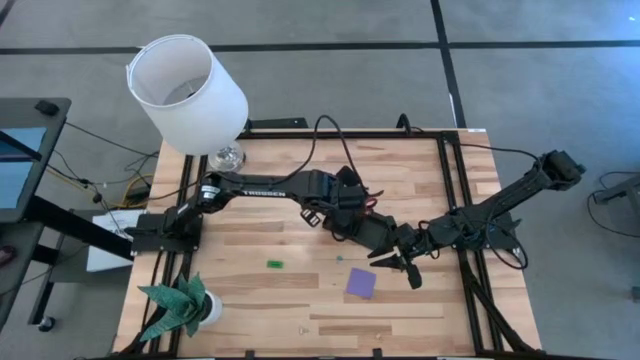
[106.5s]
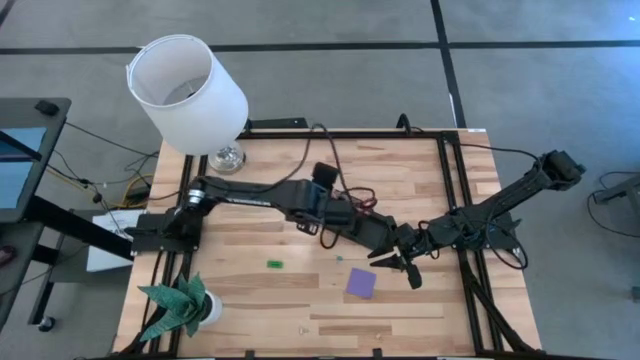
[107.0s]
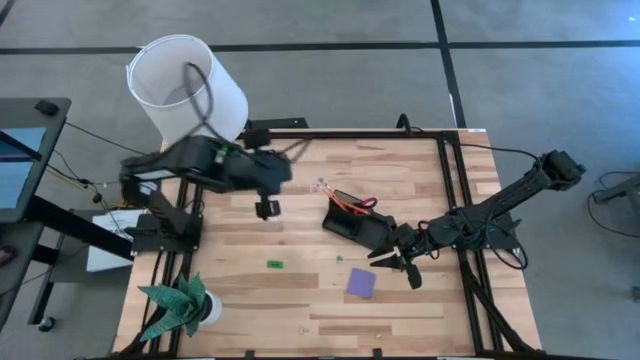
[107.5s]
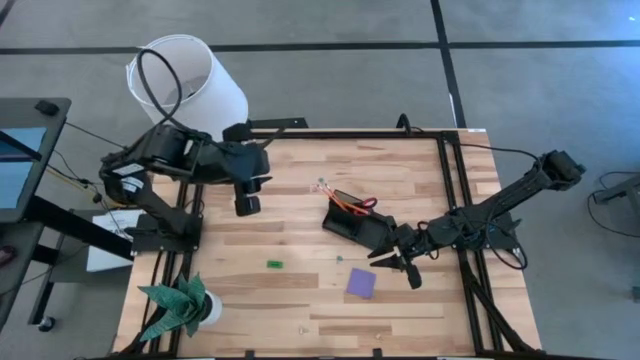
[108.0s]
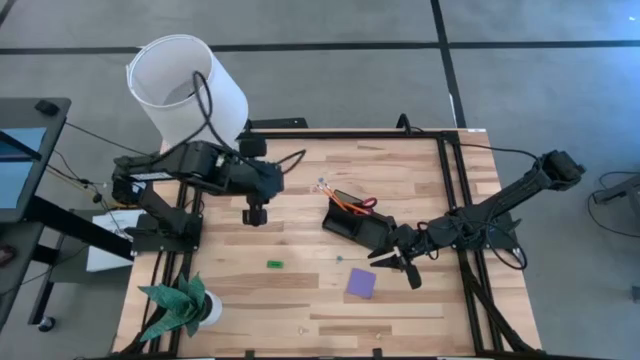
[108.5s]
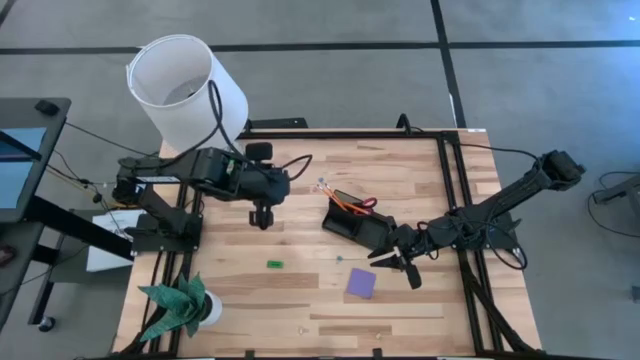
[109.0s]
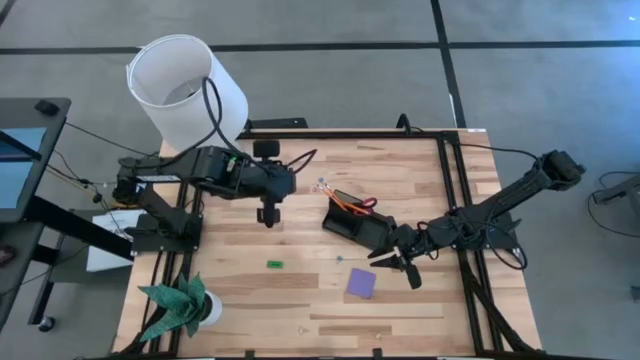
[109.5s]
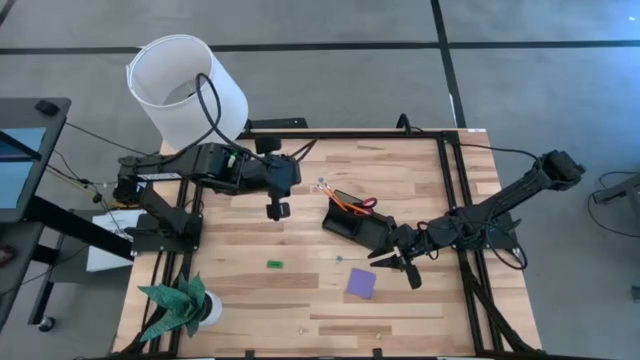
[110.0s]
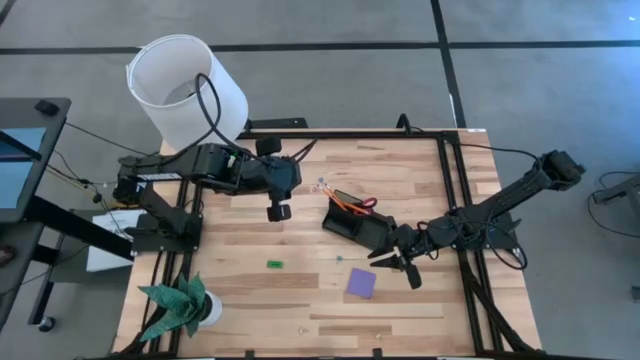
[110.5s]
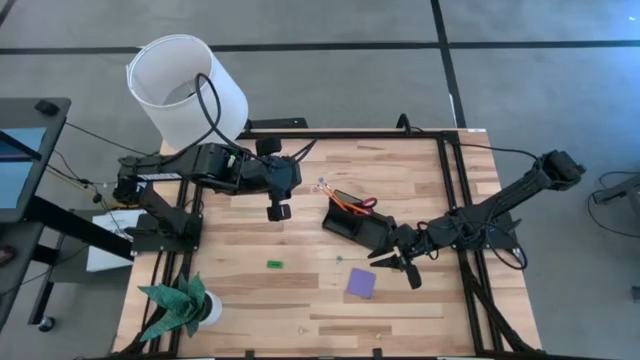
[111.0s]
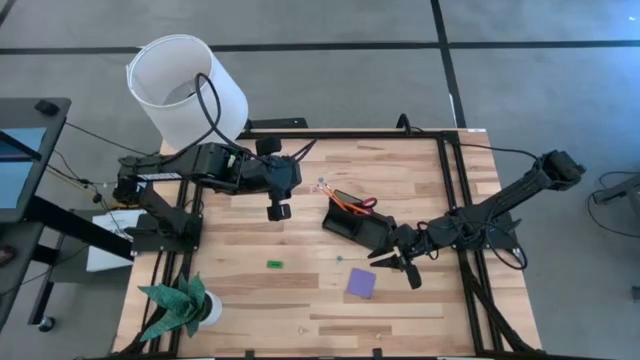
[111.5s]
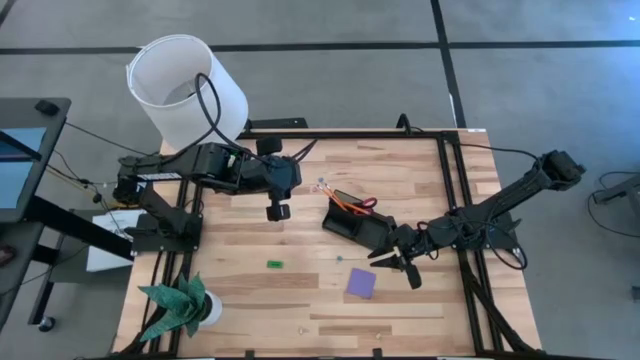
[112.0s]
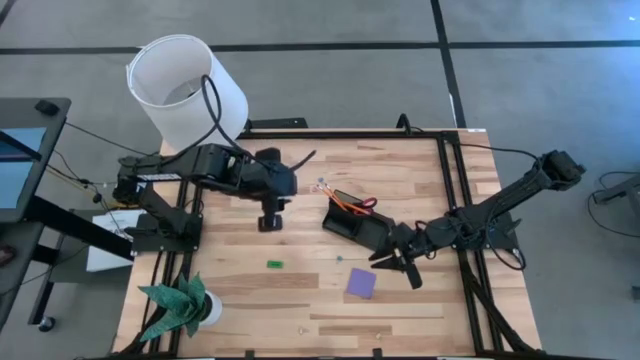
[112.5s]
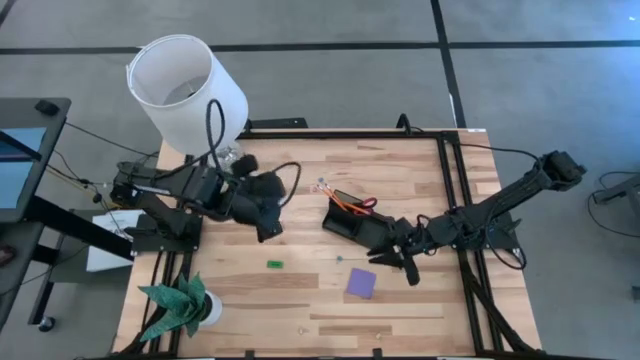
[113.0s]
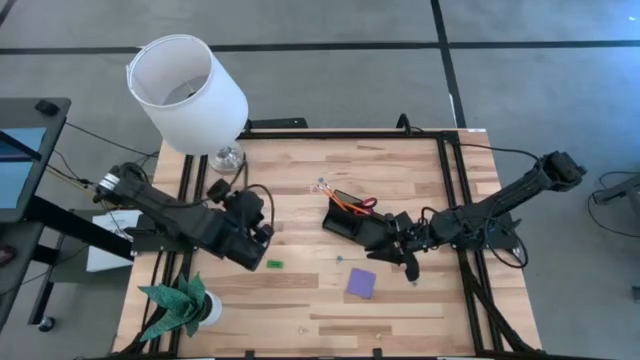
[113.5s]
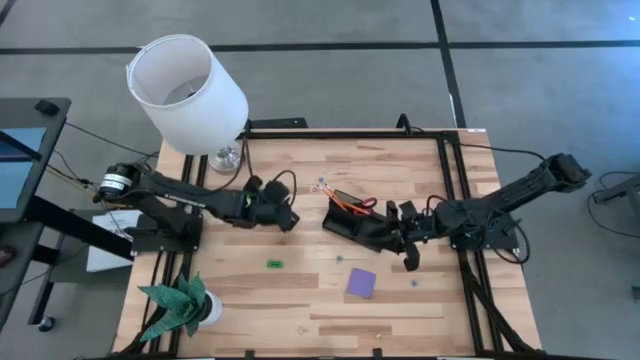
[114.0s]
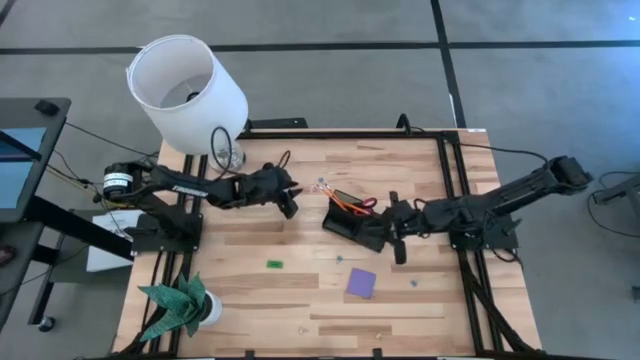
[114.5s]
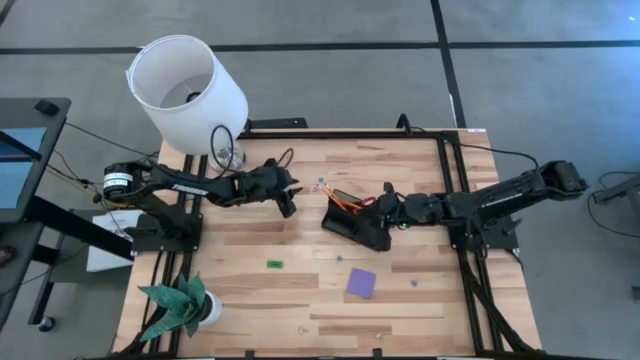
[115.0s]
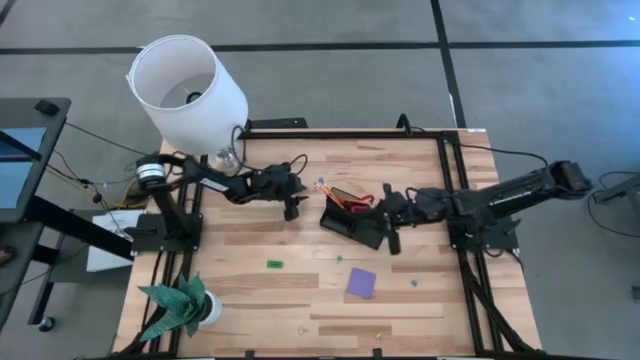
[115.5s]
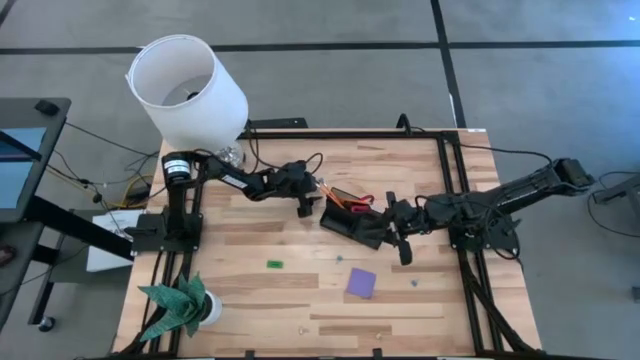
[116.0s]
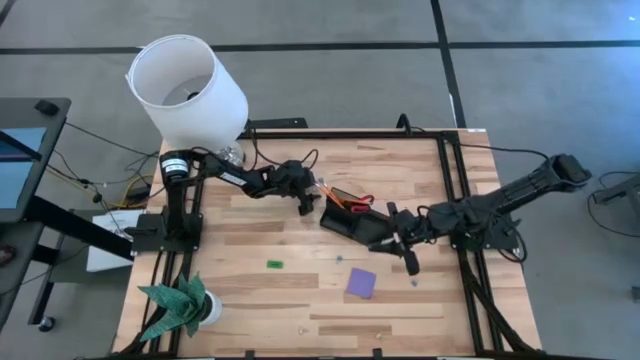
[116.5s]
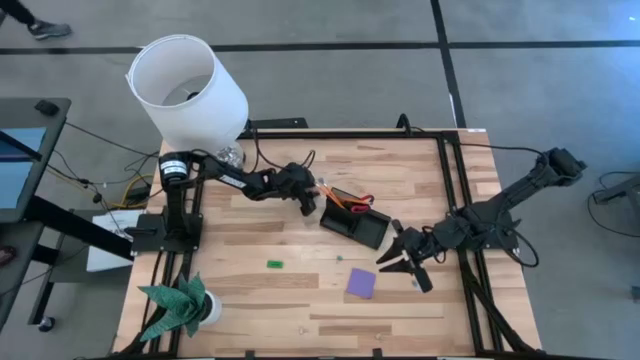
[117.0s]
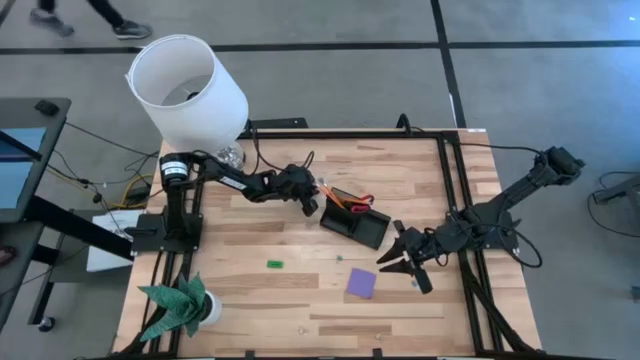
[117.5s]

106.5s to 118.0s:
Task: Pick and place office supplies into organizer
Put the pink binder clip into the black desk organizer

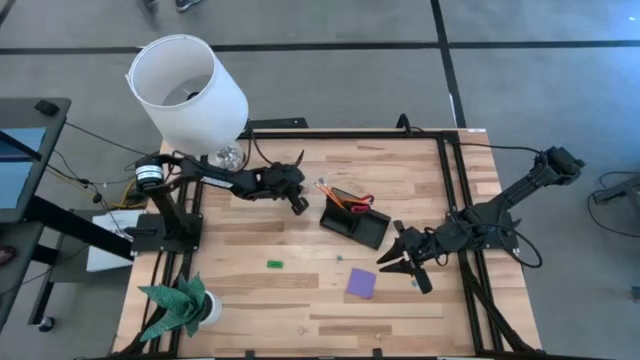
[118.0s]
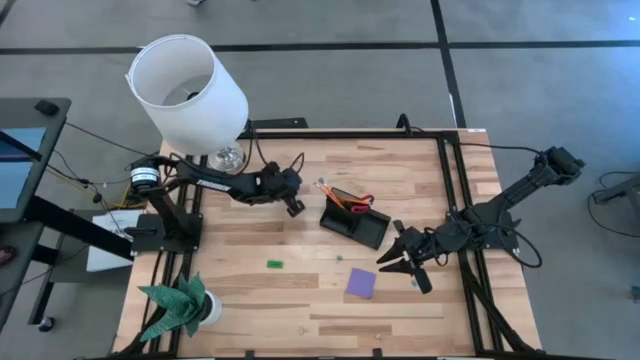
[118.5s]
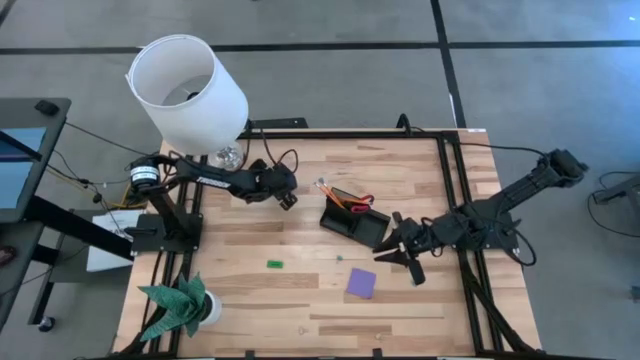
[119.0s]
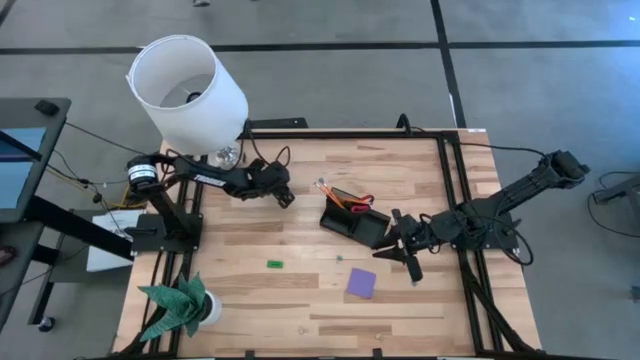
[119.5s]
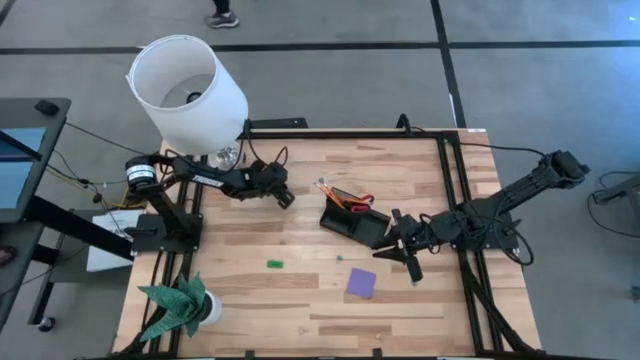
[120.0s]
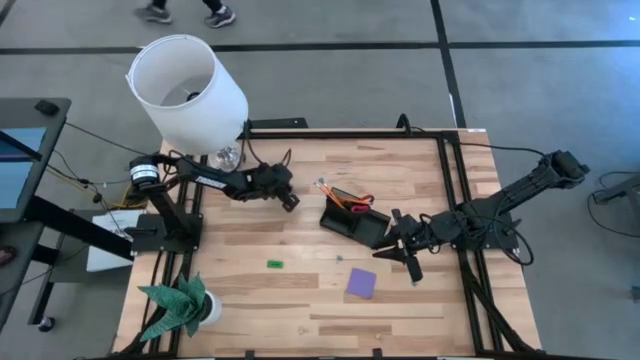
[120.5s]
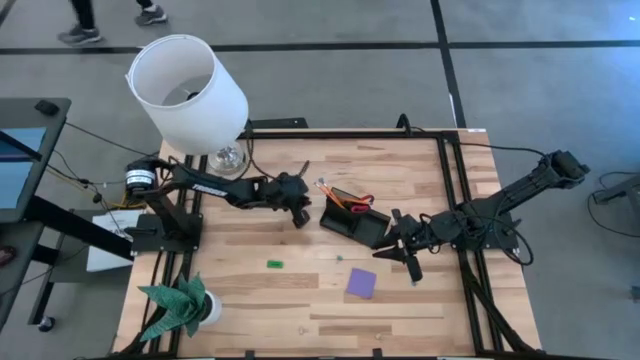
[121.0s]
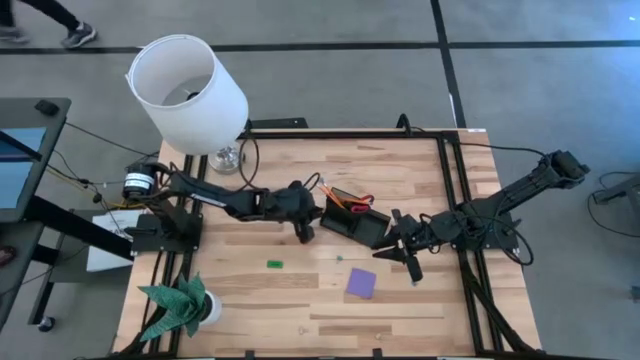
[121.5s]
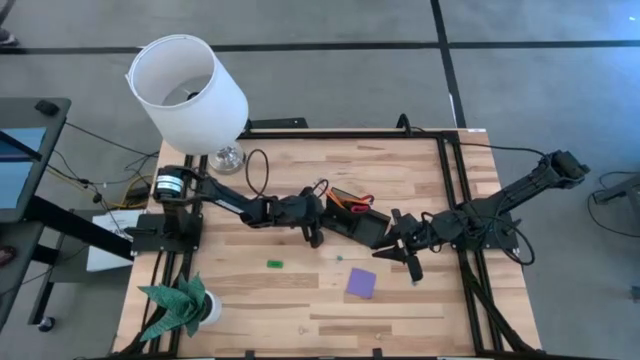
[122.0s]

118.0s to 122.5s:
Put the pink binder clip into the black desk organizer

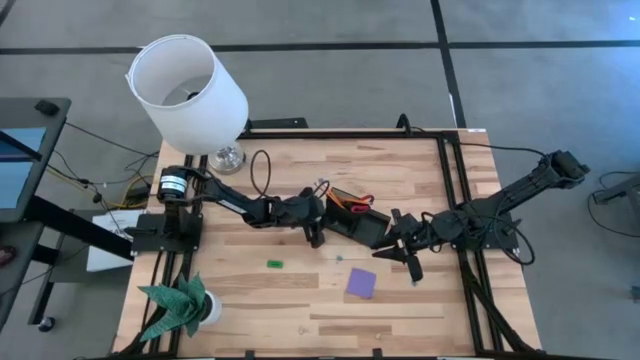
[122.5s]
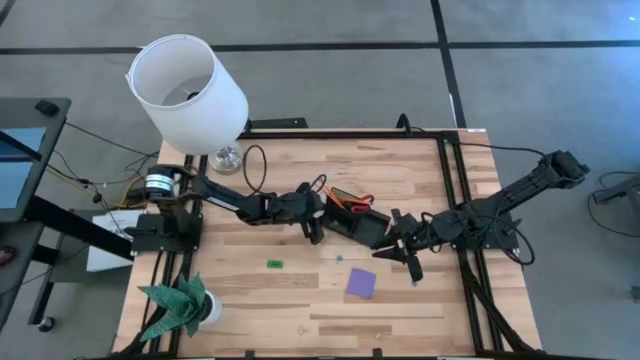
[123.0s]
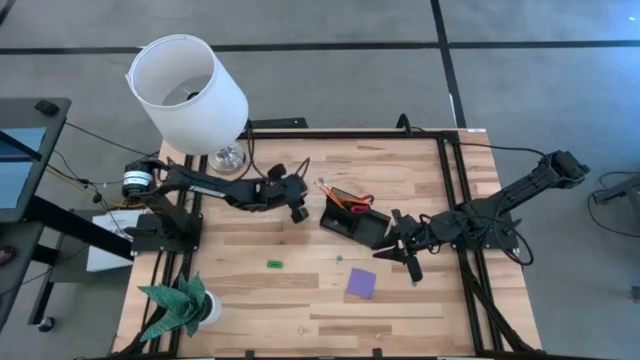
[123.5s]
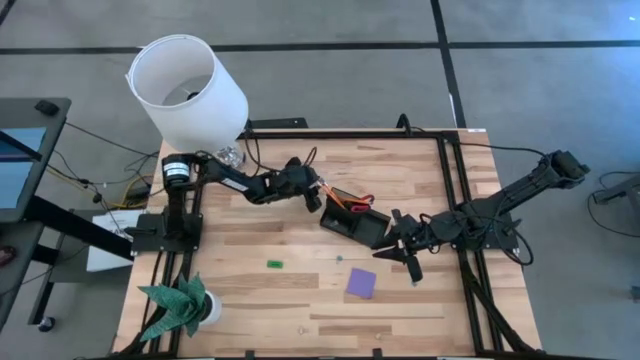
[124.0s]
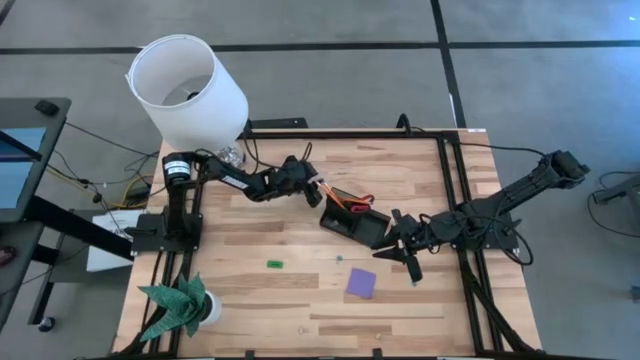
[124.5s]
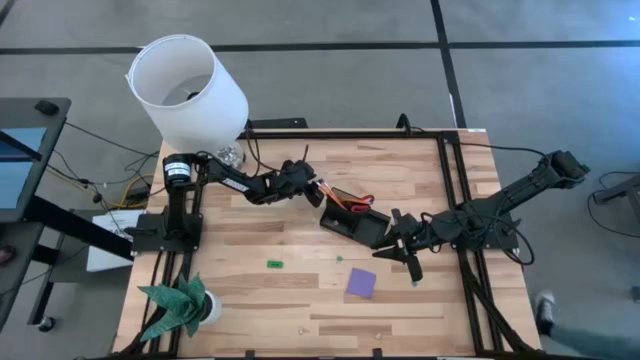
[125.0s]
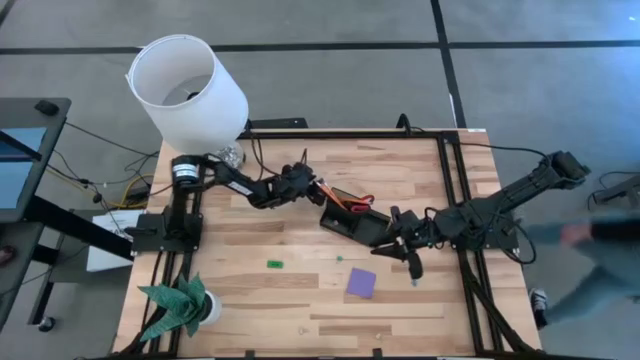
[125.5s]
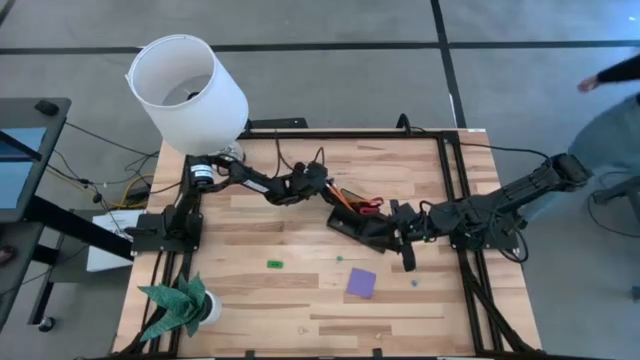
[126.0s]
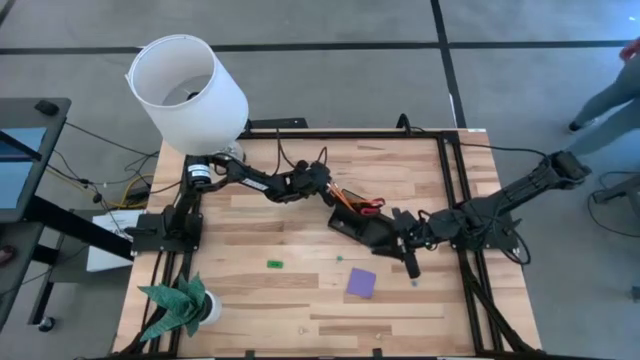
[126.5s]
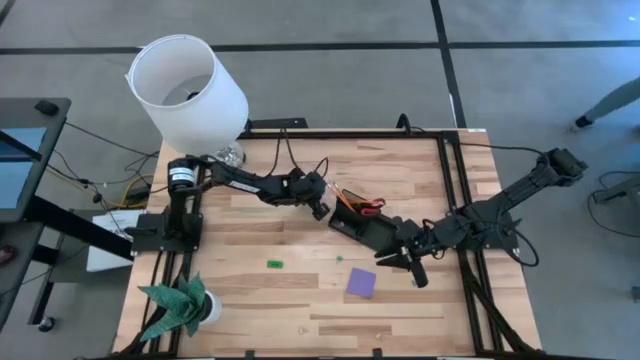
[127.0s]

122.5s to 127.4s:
Put the top blue binder clip into the black desk organizer

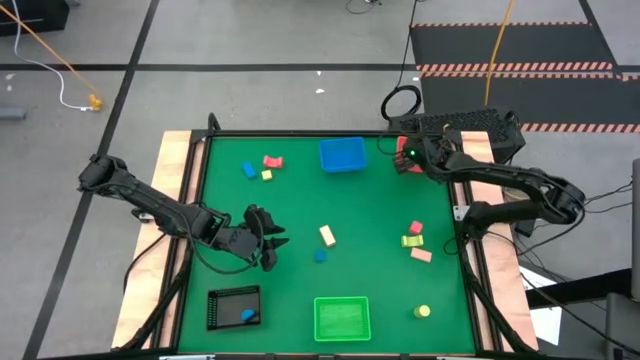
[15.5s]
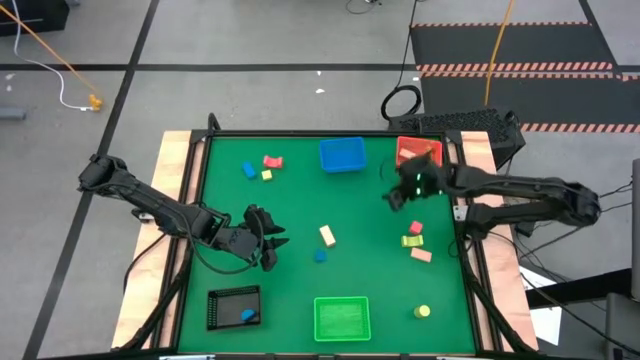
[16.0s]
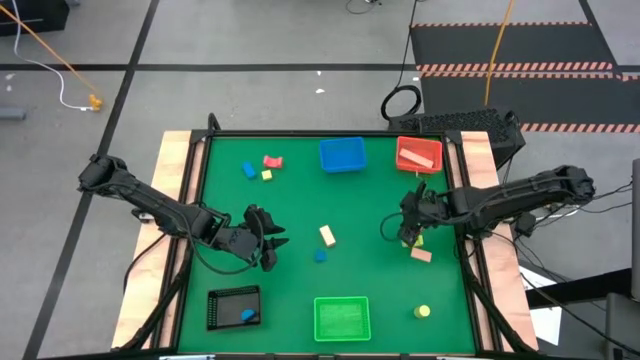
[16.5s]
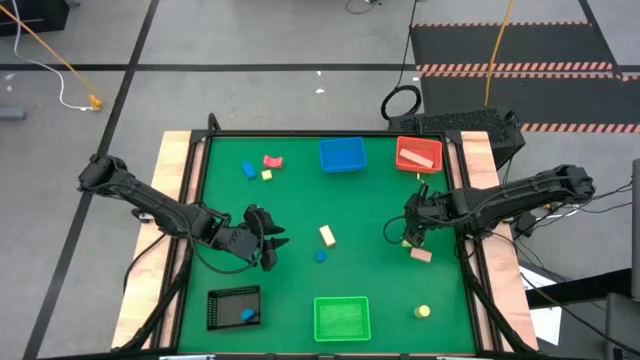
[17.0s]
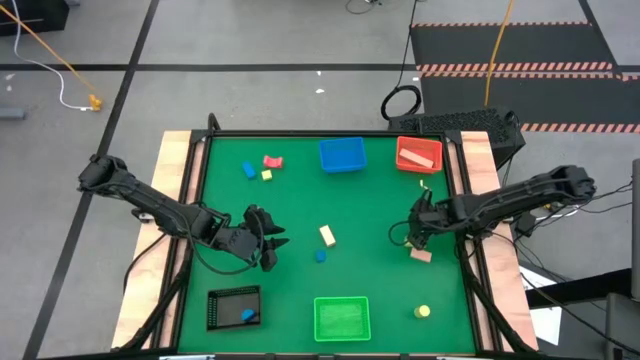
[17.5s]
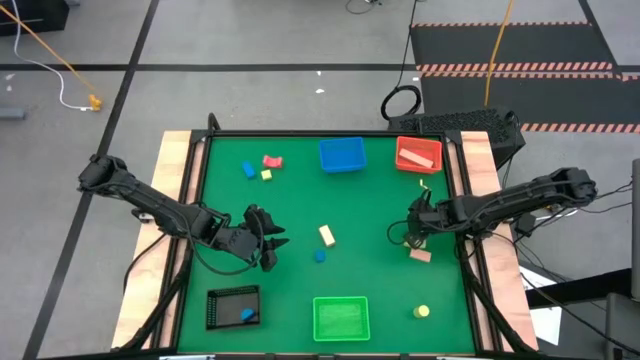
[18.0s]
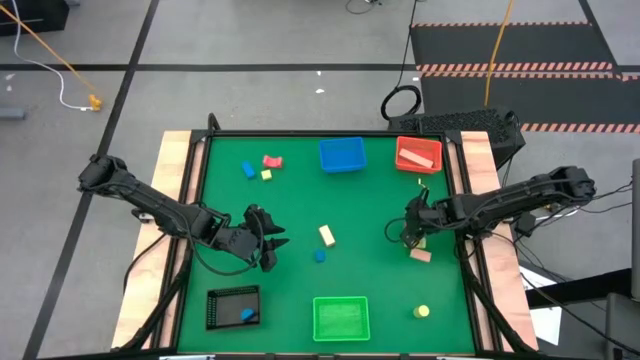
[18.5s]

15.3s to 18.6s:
Task: Sort & place blocks by color
Put the pink block into the blue bin
